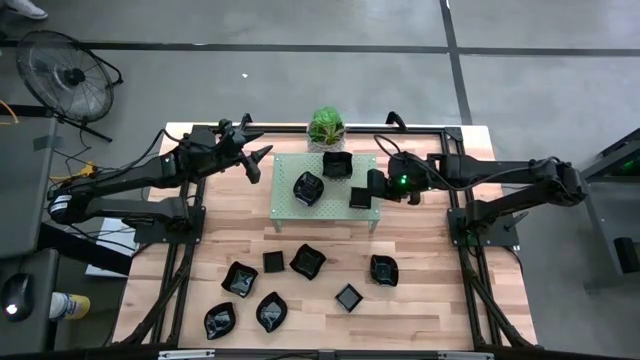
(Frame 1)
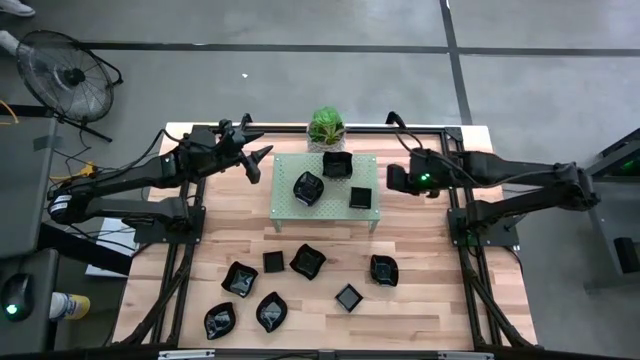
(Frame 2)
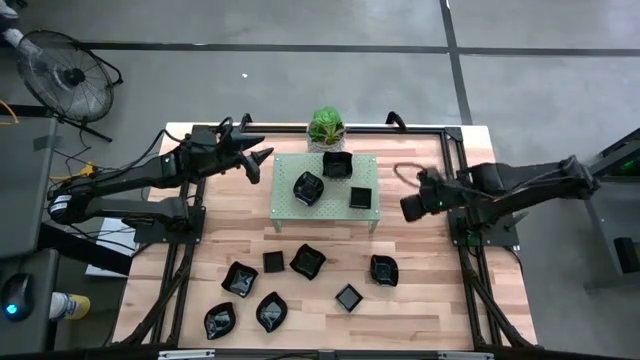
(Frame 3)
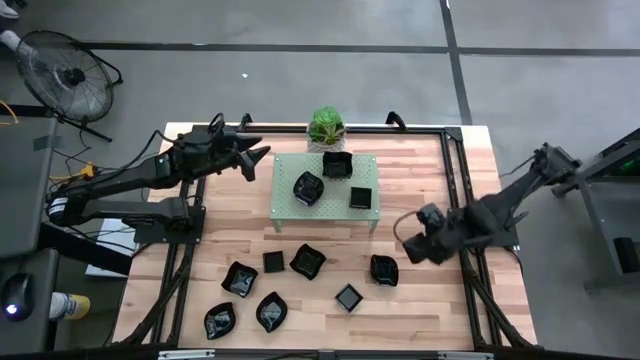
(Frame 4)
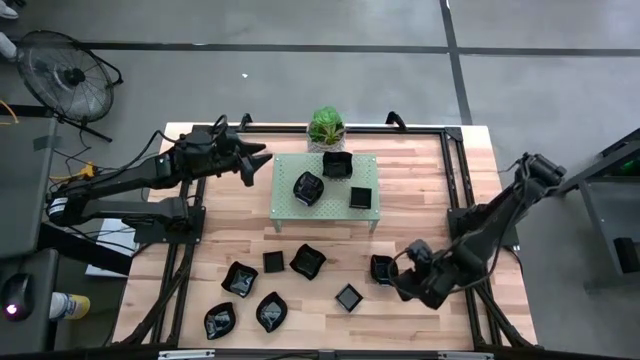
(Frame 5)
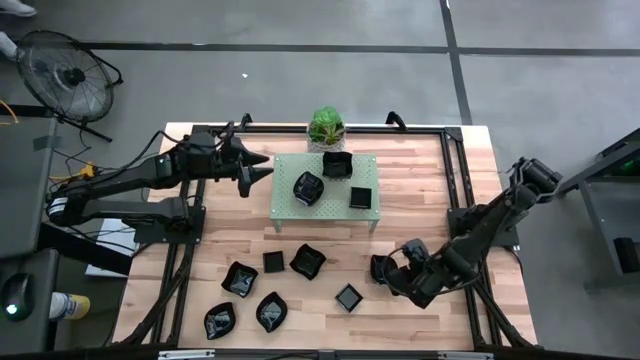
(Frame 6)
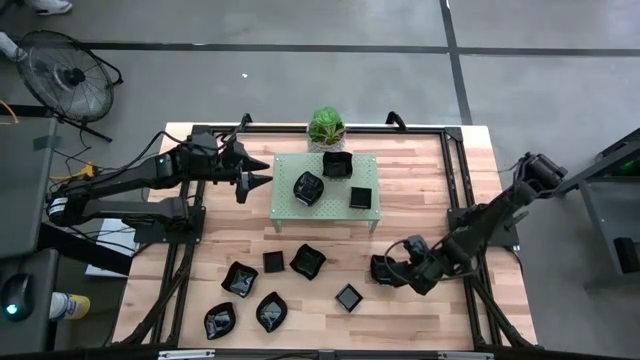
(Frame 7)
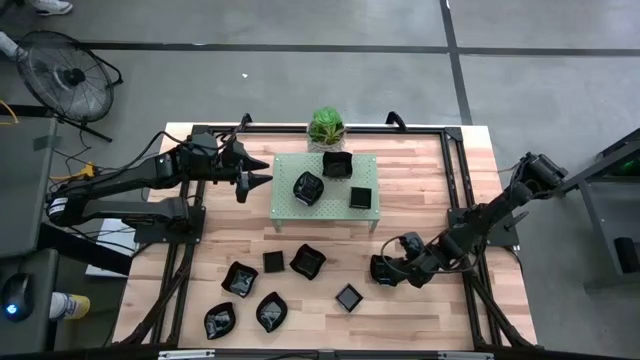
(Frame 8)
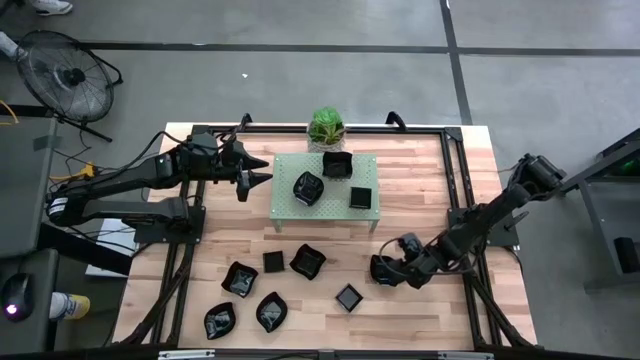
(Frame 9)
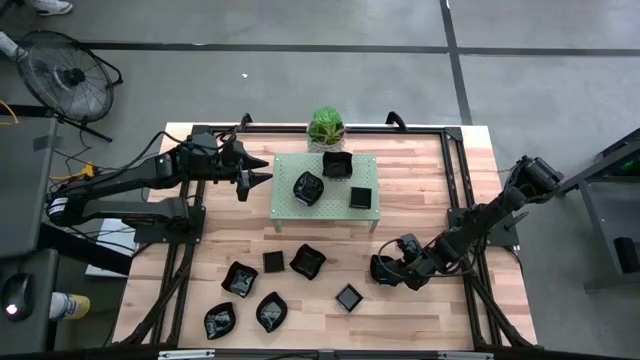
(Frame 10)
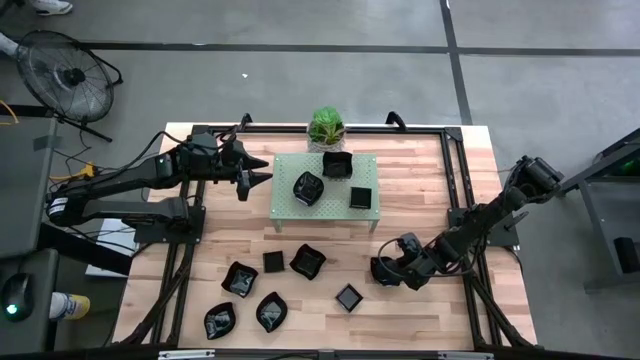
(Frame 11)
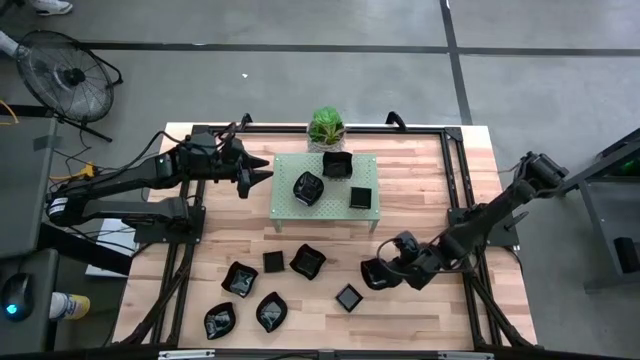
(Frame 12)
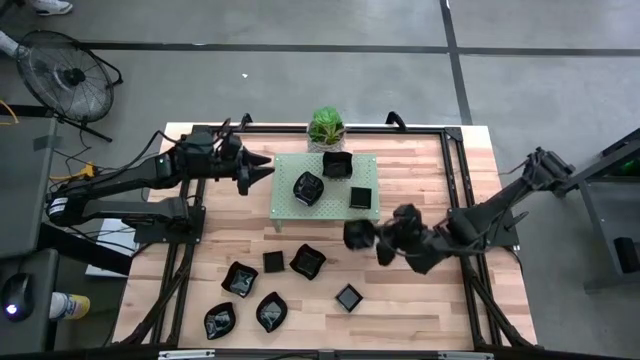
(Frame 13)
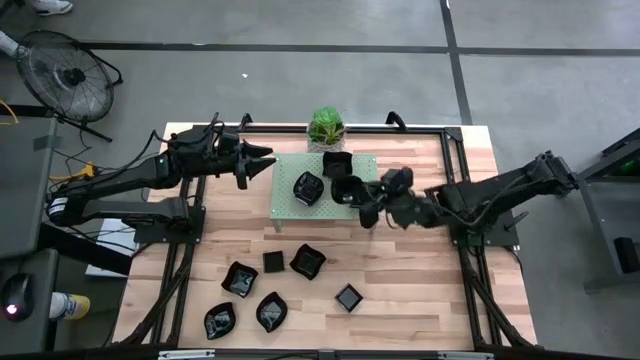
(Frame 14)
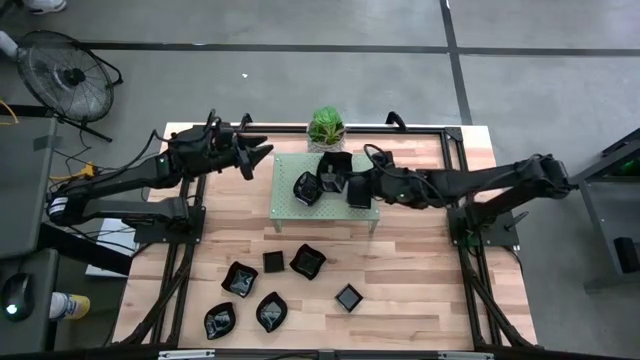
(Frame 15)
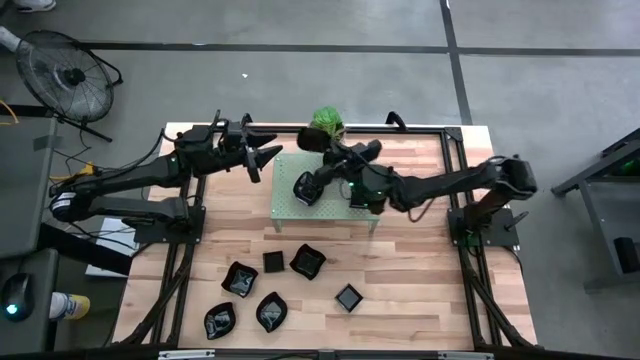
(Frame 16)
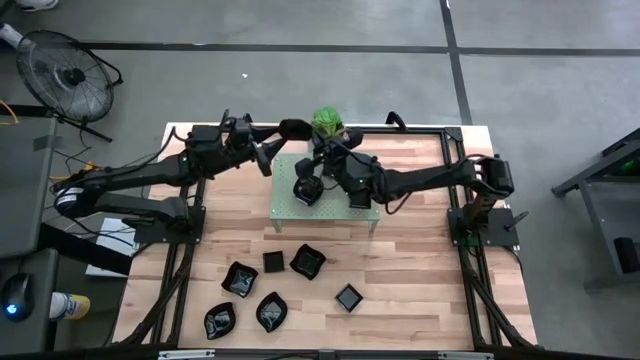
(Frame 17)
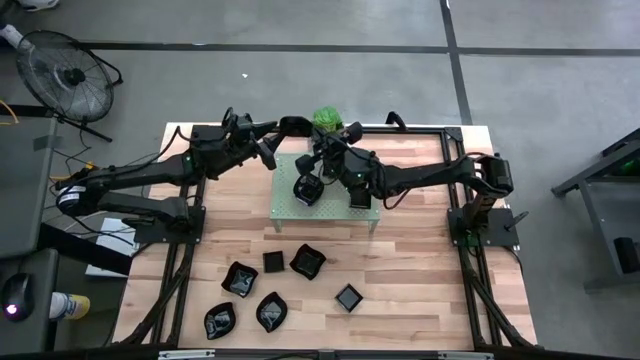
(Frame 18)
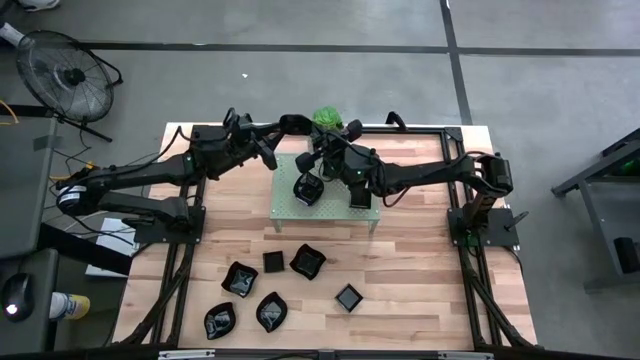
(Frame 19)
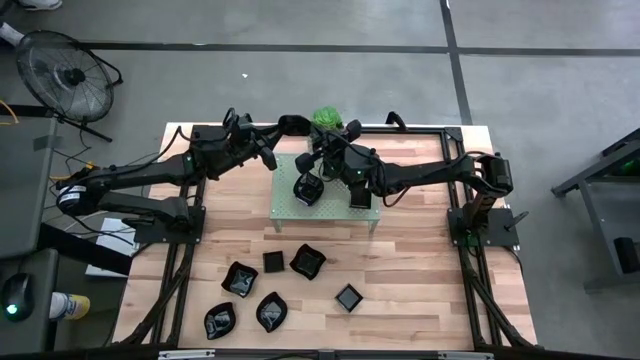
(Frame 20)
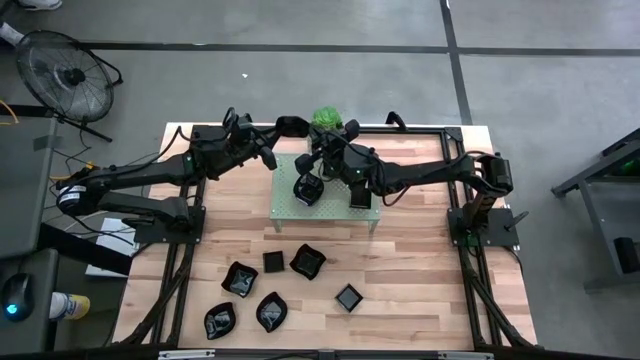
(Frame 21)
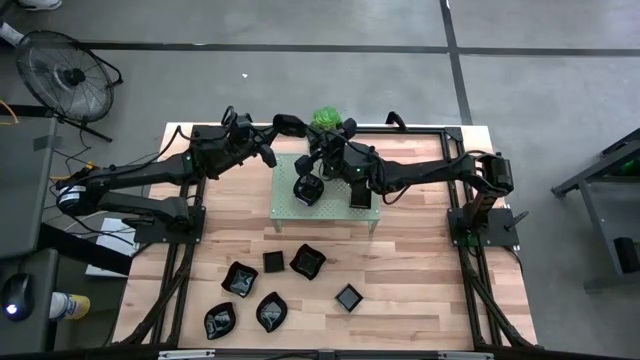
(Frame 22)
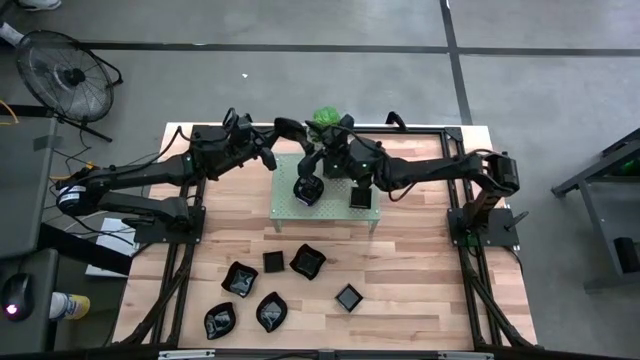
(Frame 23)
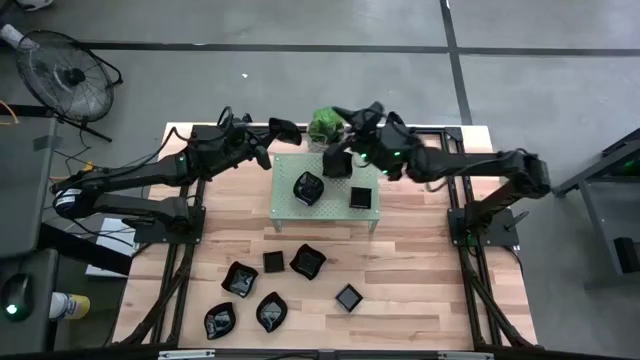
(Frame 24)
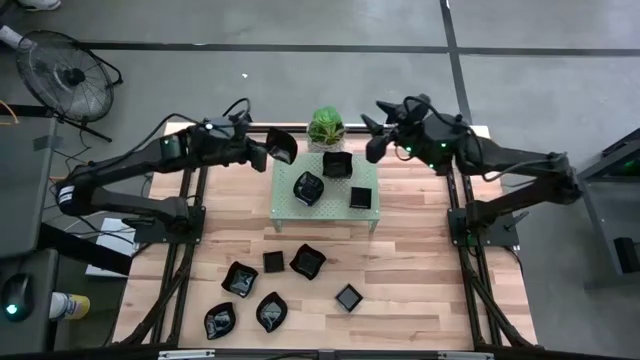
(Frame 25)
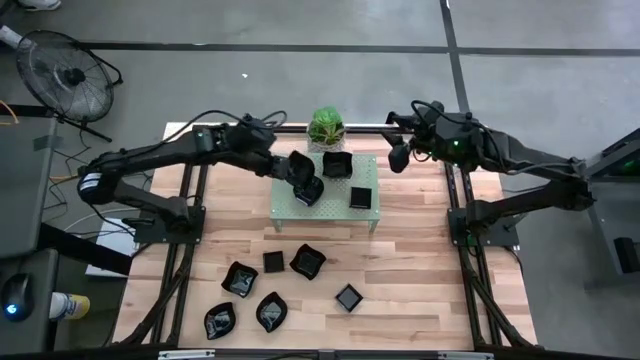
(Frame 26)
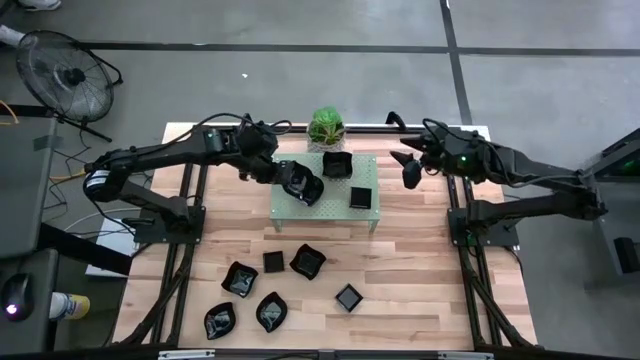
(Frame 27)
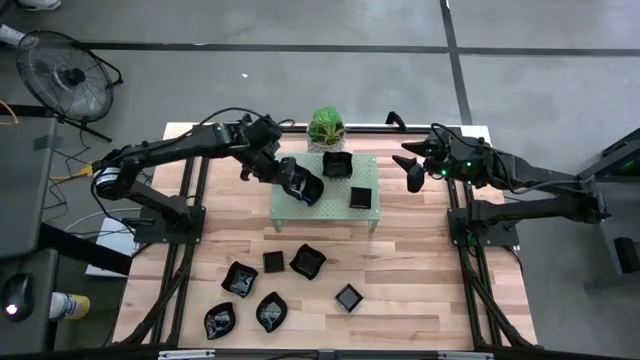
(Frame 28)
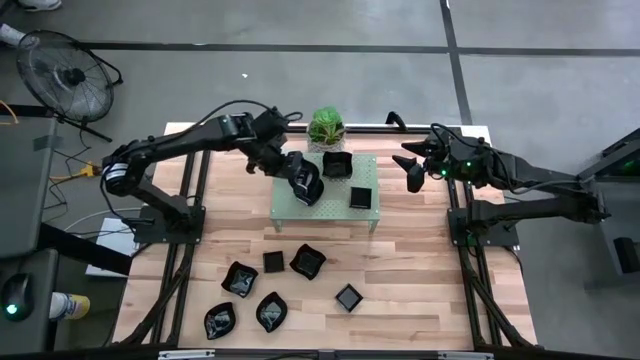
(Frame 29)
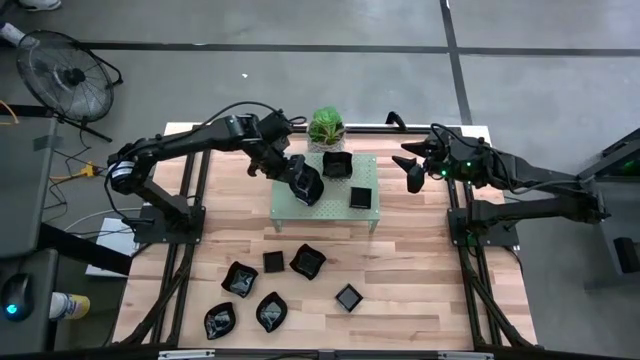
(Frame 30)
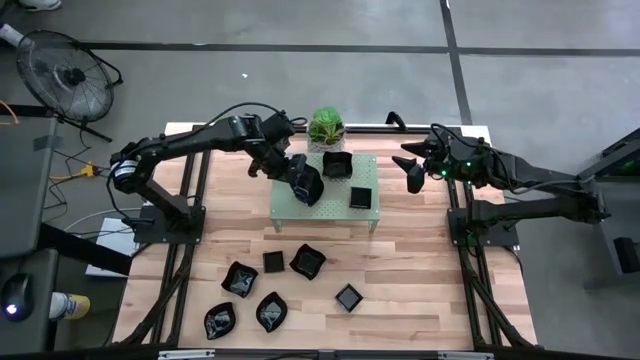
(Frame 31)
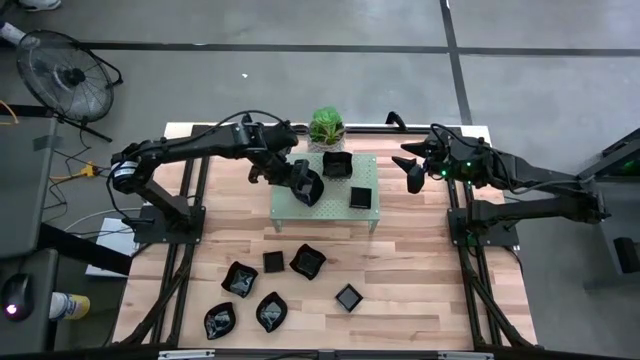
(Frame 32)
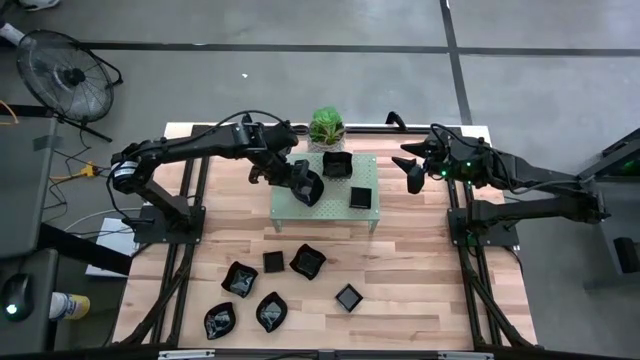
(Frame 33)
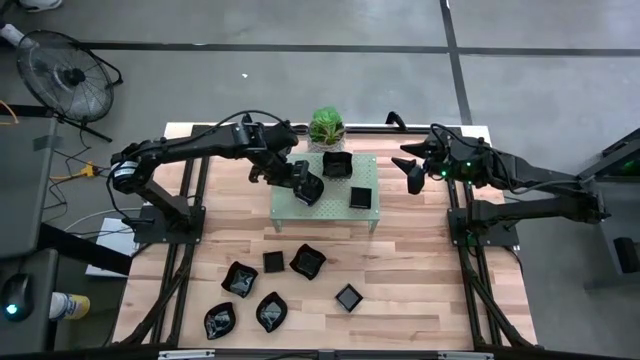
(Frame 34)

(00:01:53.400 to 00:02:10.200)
Task: Pick & Place Mini shaped plates
Stack the black leaf plate on the other black leaf plate on the shelf

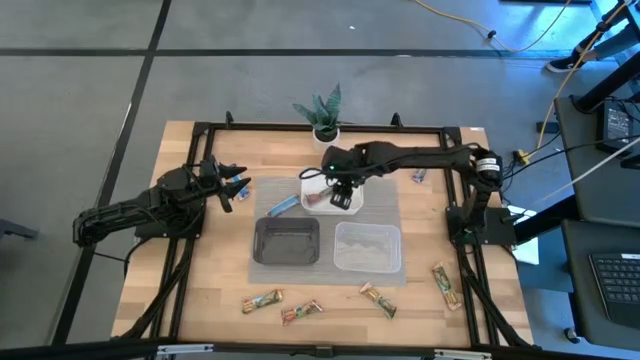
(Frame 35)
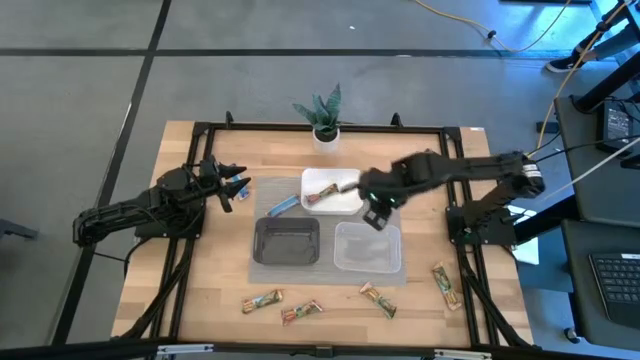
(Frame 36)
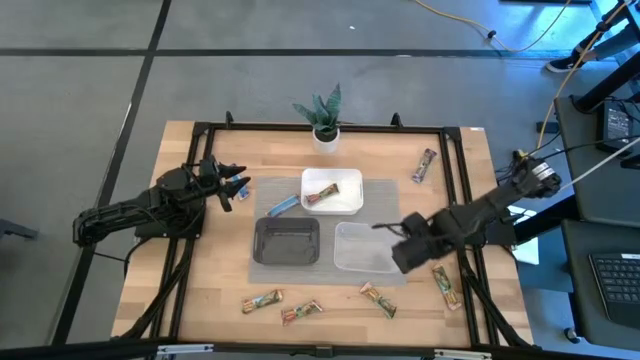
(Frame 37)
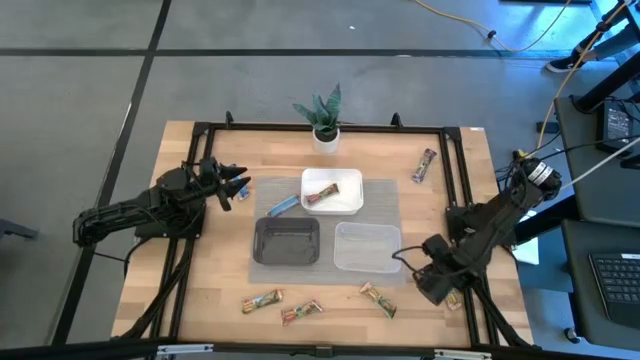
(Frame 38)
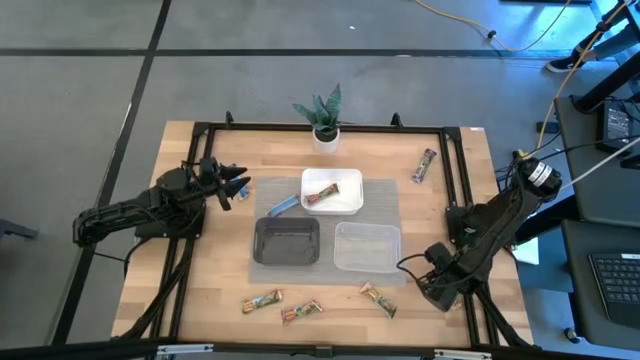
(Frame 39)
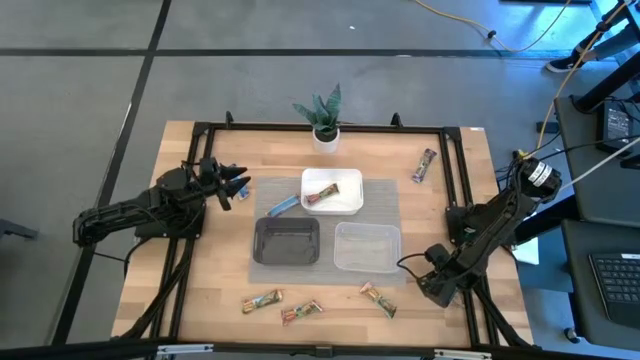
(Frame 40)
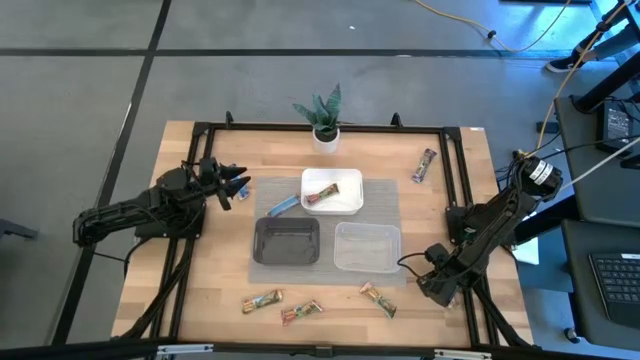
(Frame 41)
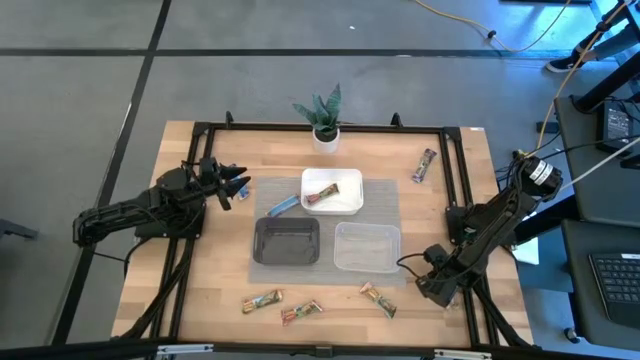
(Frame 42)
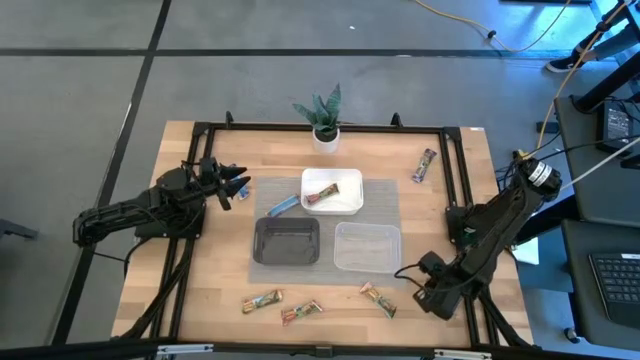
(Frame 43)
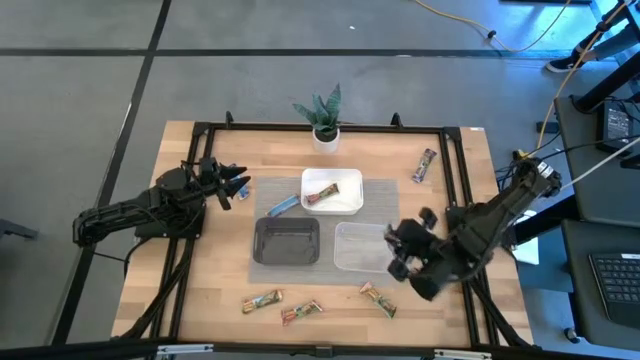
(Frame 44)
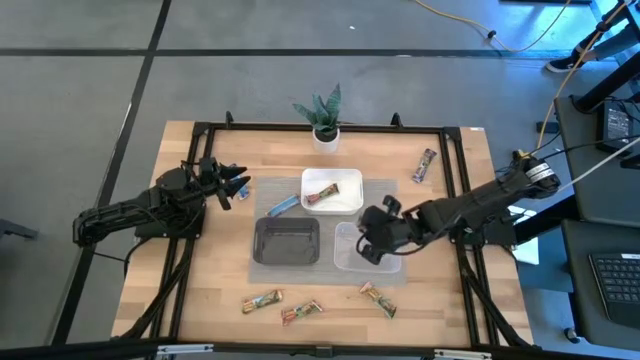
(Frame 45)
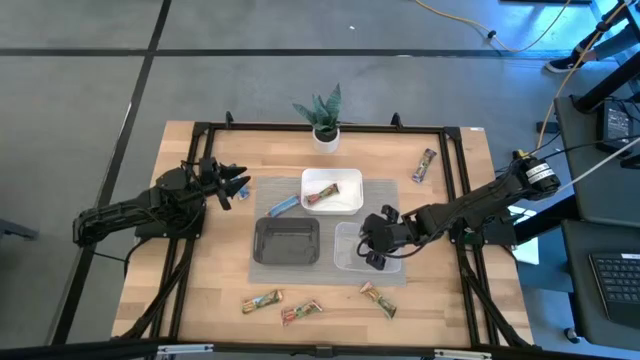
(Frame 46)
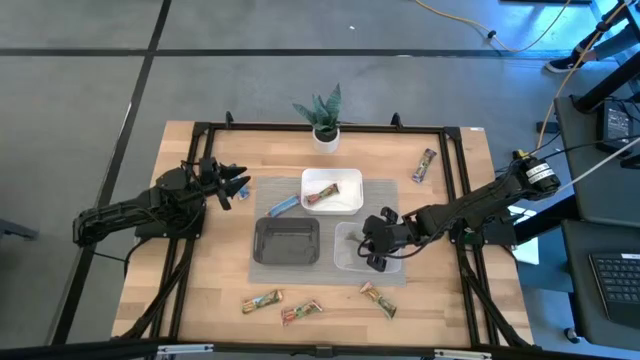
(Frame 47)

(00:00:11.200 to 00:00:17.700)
Task: Pick and place Granola Bars by type
Put the right yellow granola bar into the transparent bin
